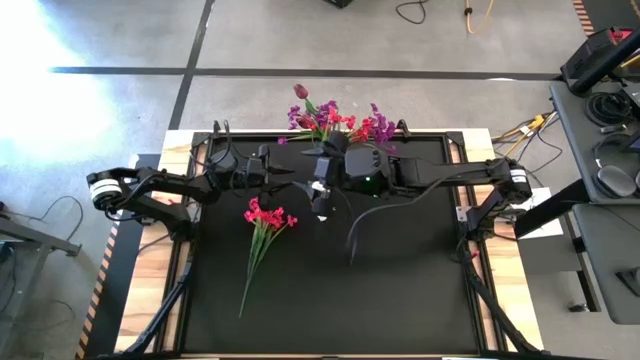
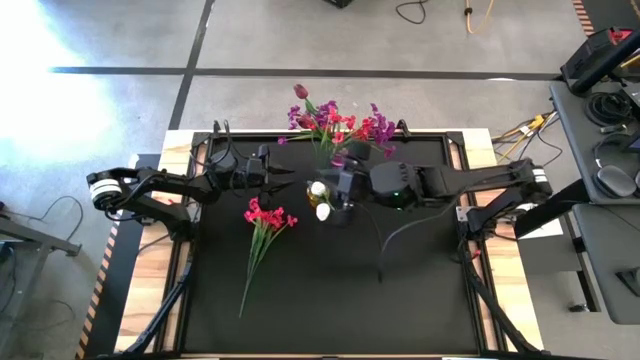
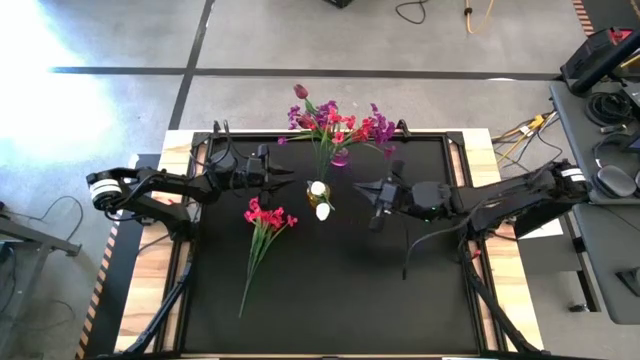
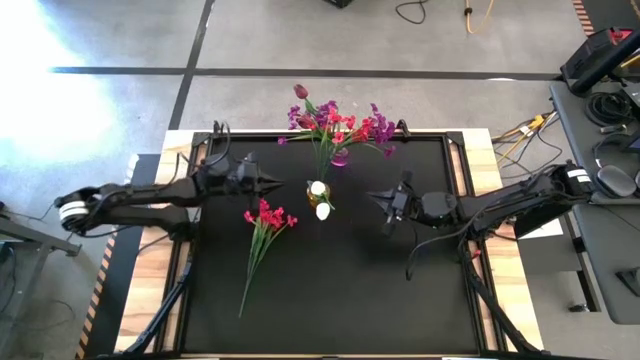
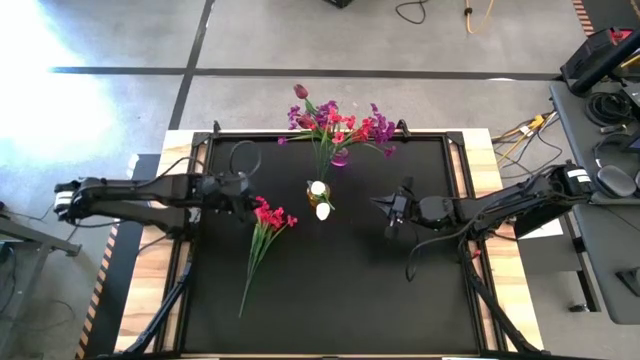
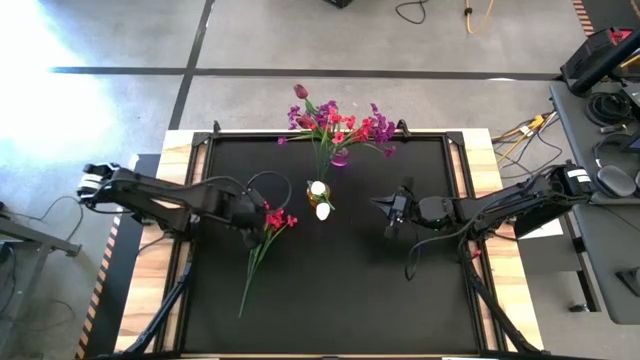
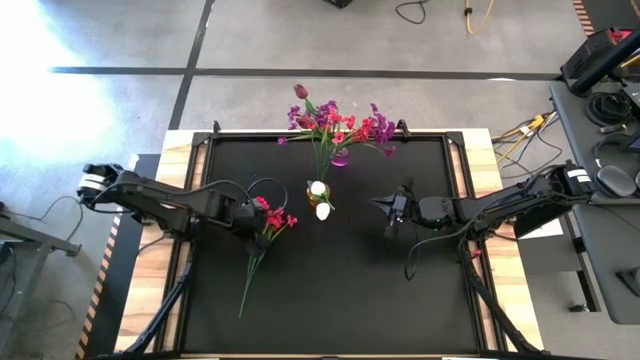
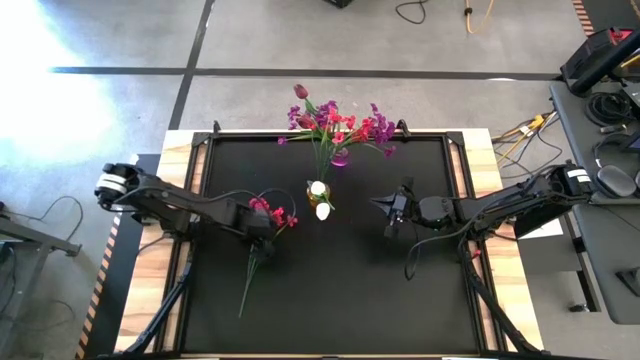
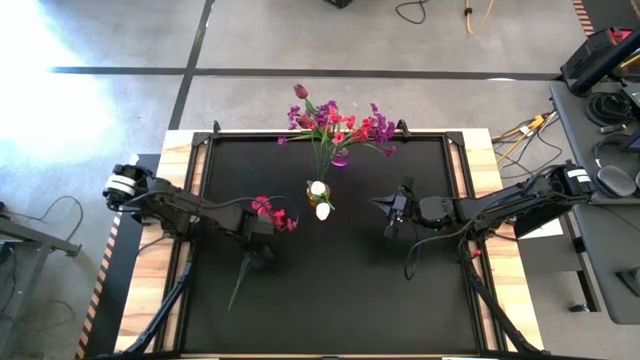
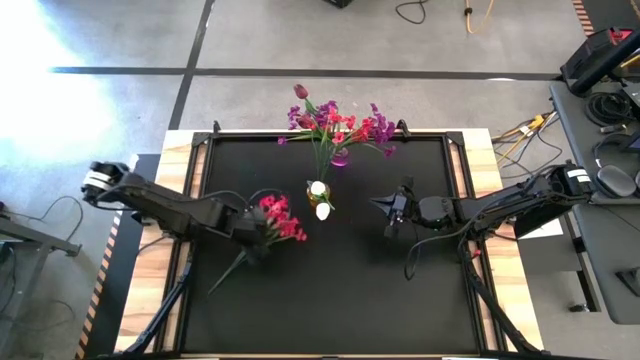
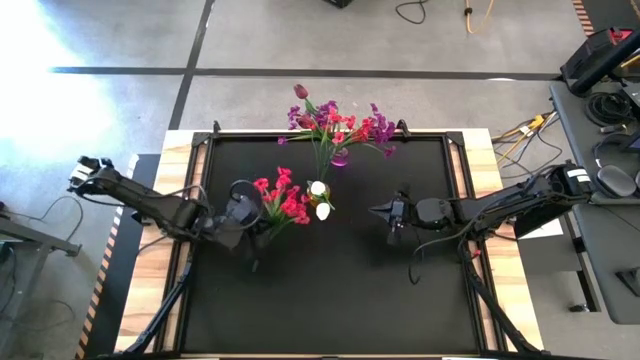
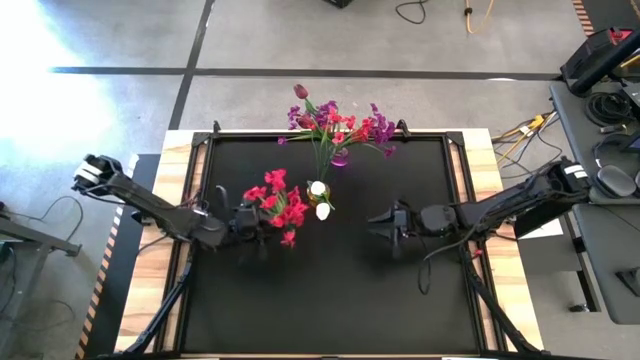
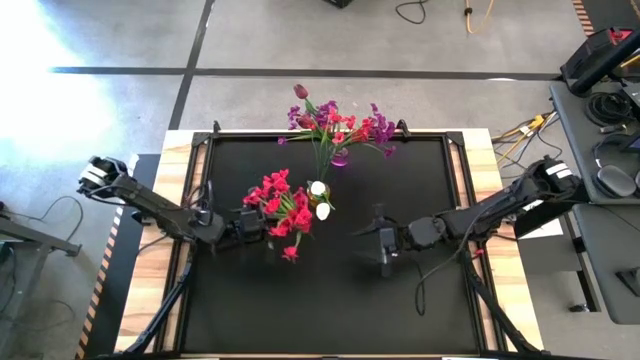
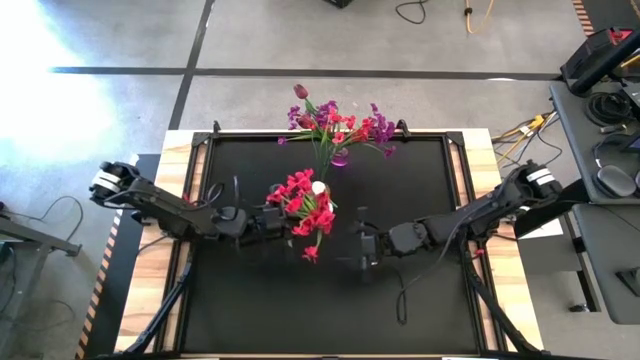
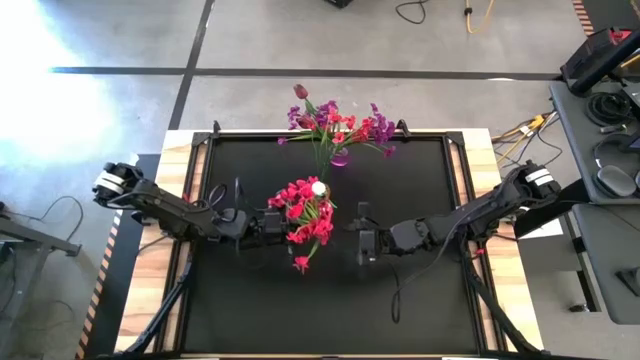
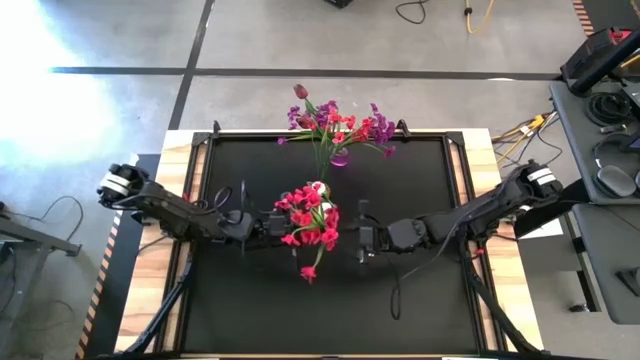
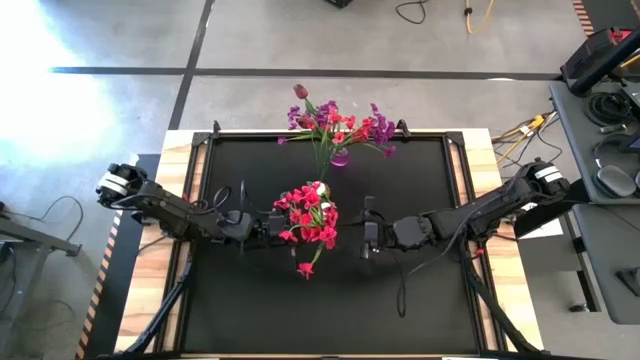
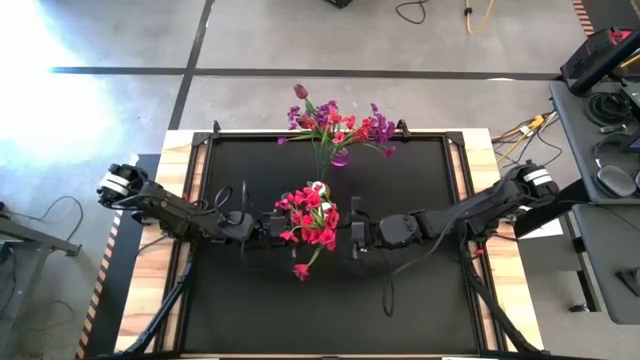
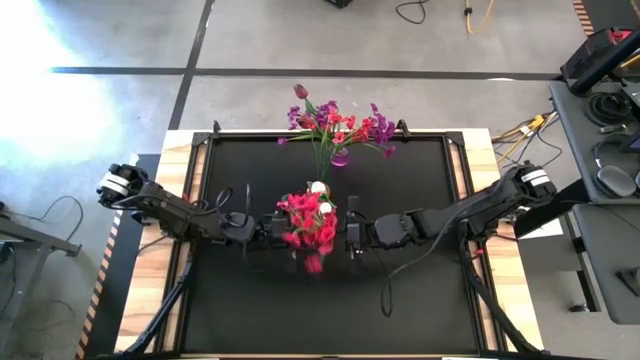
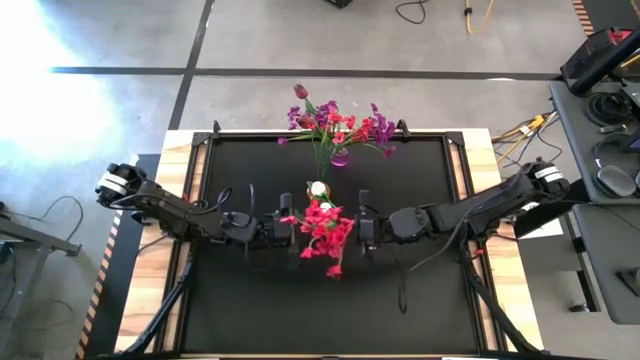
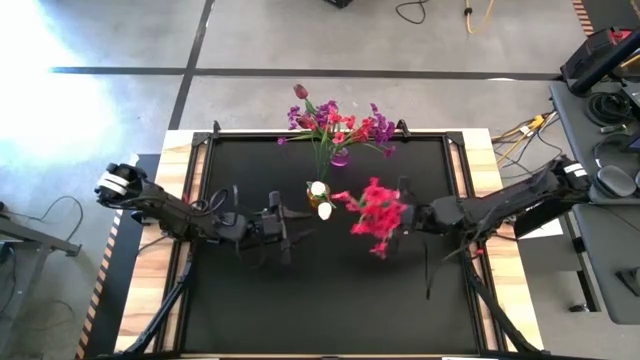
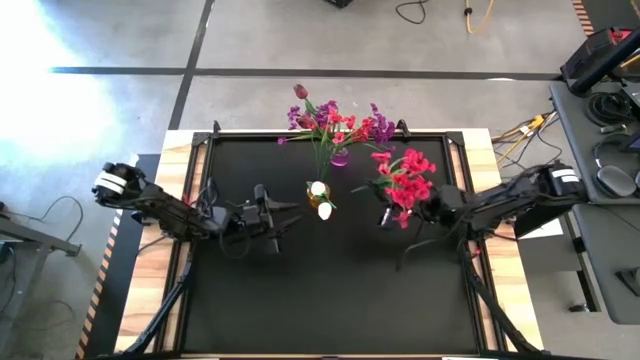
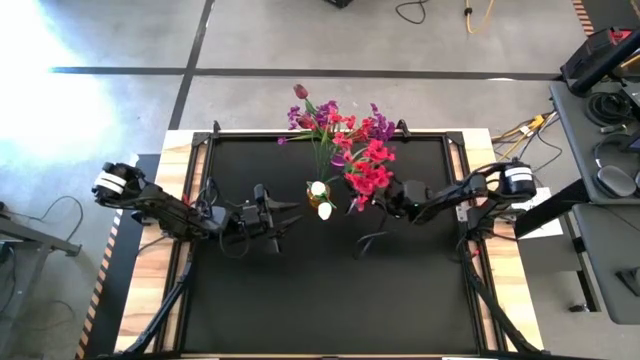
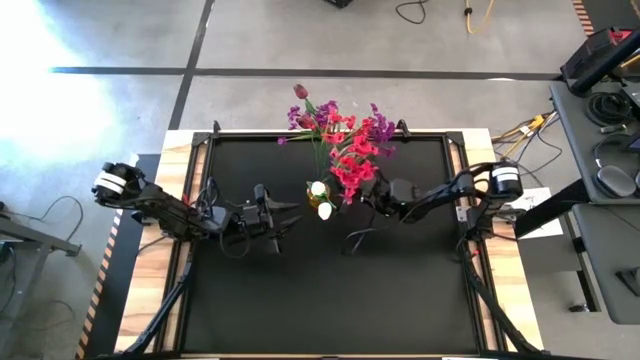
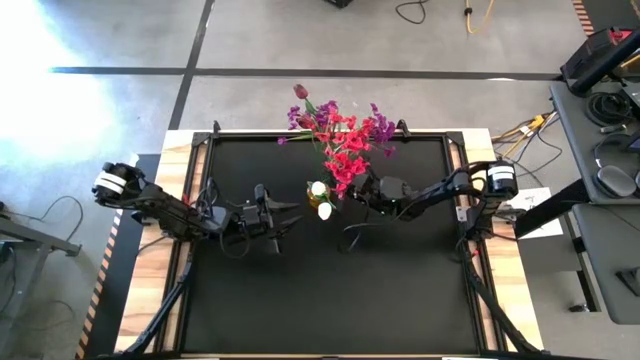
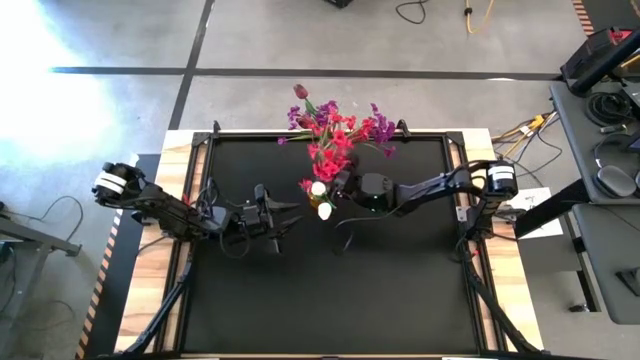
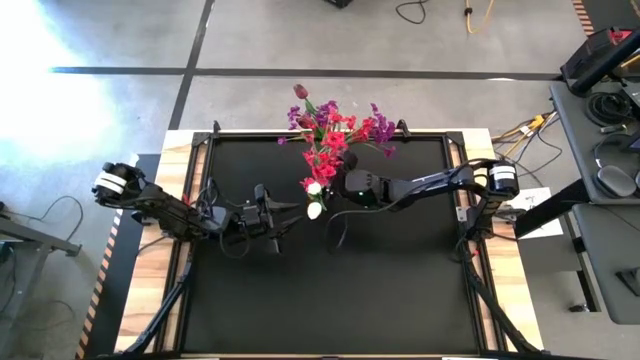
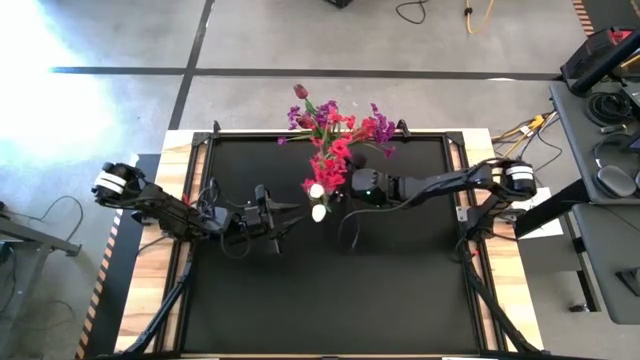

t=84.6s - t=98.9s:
Task: Sort flowers into vase by color
Put the red flowers into the yellow vase

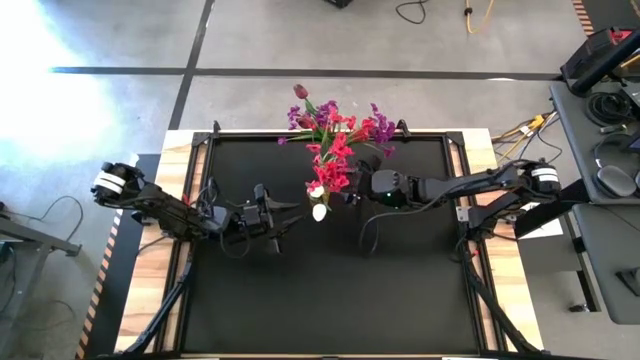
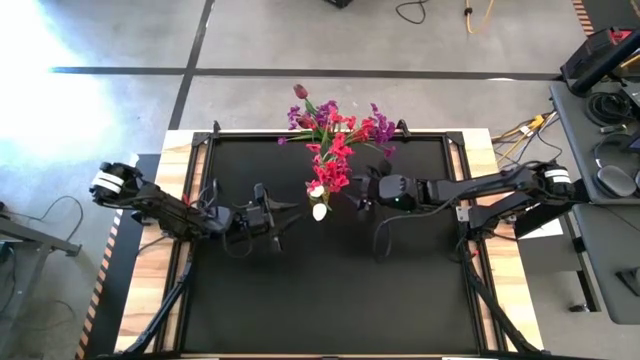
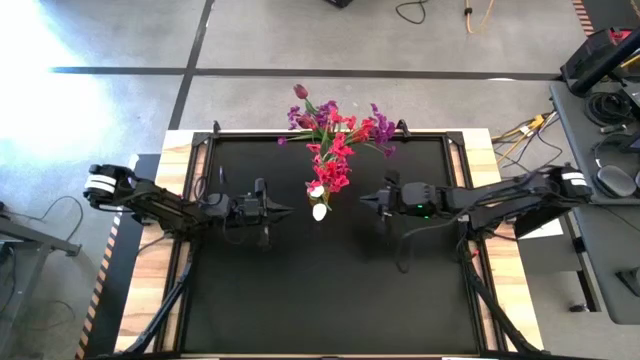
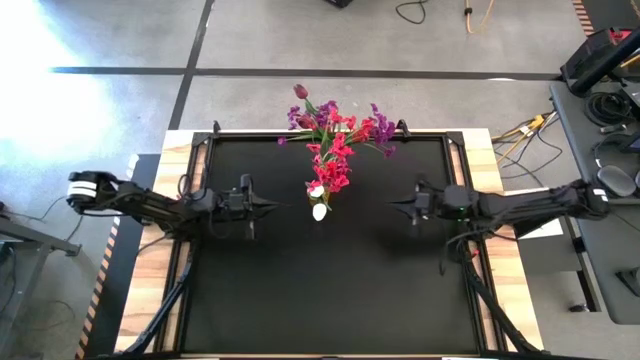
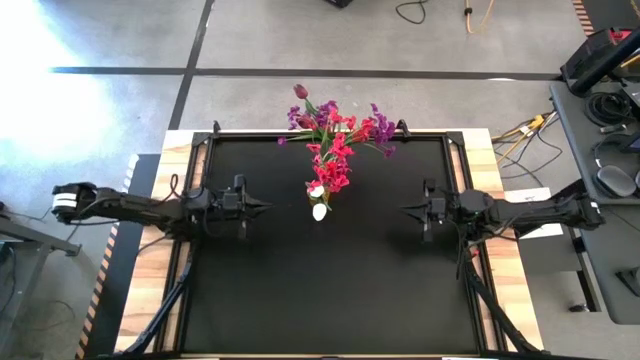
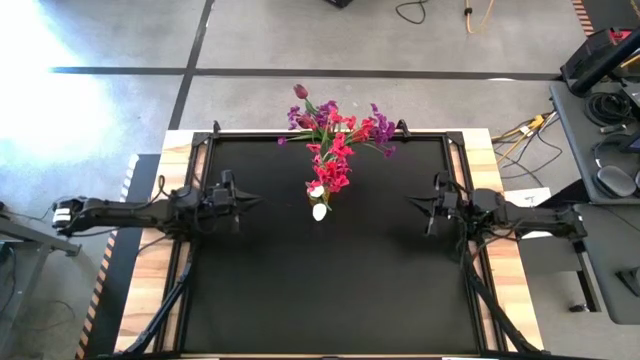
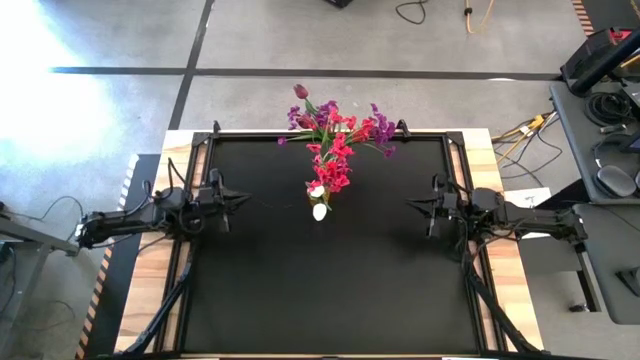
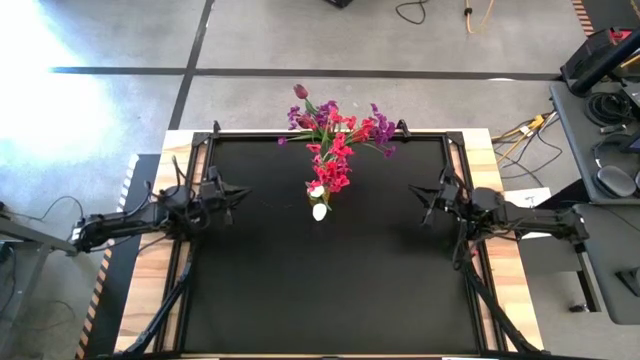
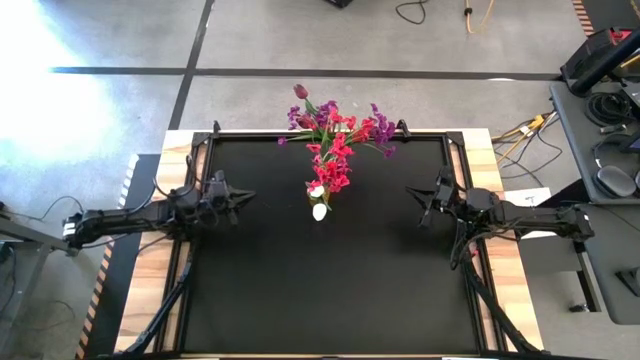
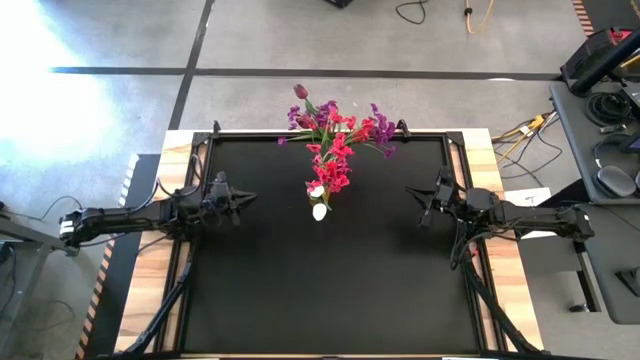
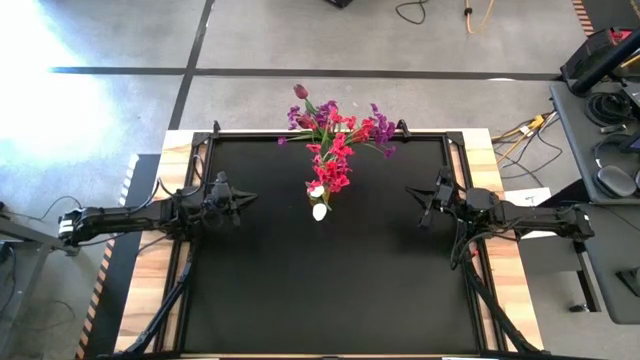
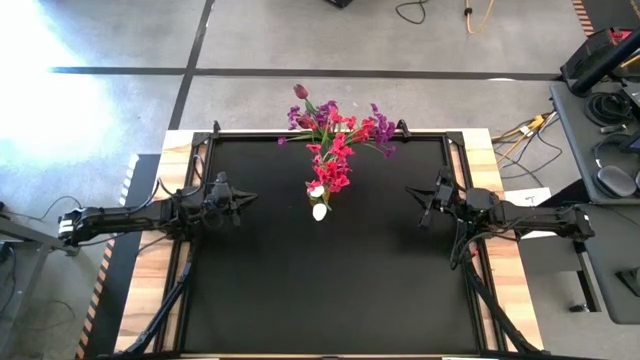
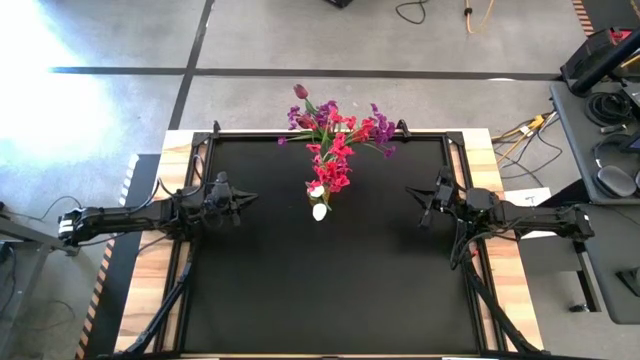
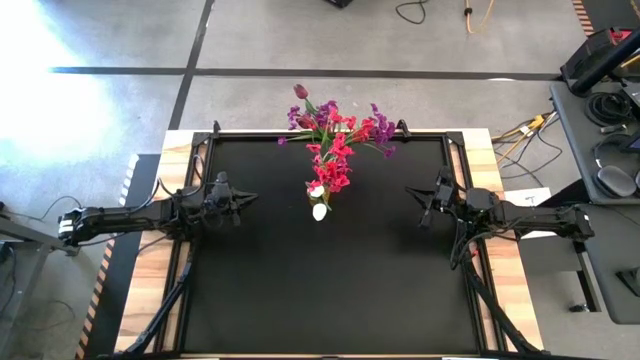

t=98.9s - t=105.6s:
Return to Home Position
